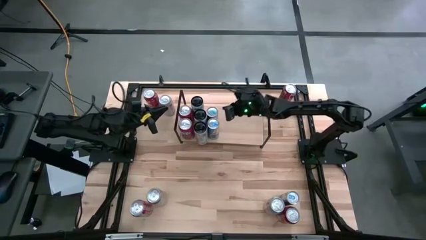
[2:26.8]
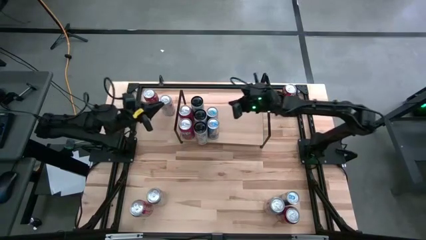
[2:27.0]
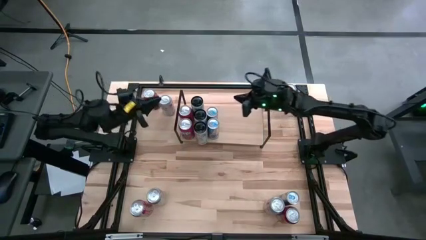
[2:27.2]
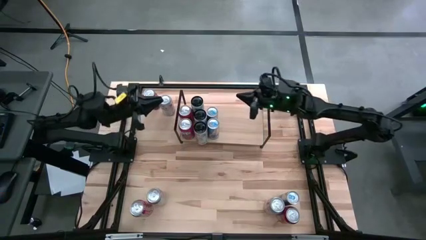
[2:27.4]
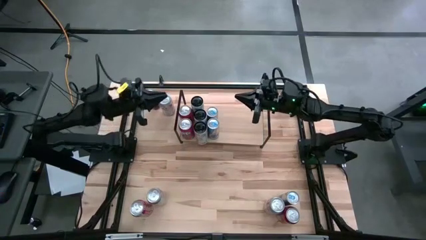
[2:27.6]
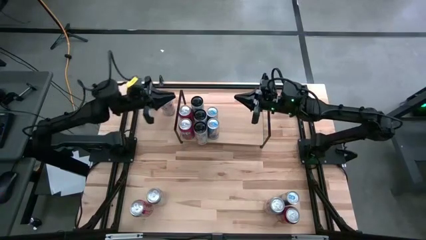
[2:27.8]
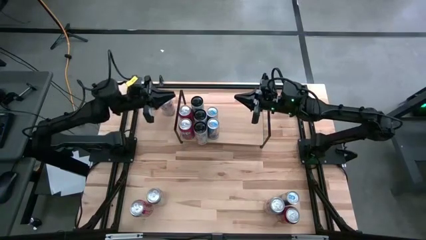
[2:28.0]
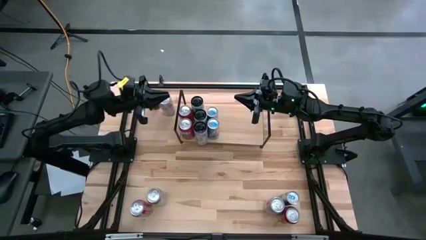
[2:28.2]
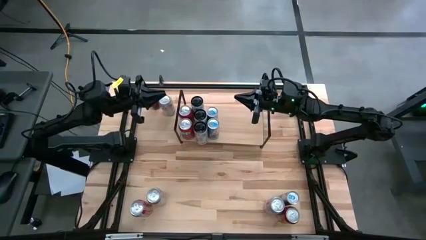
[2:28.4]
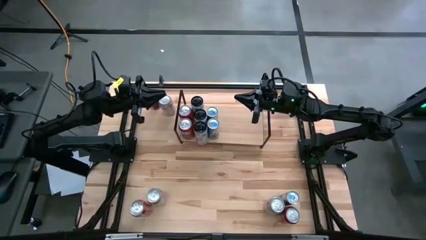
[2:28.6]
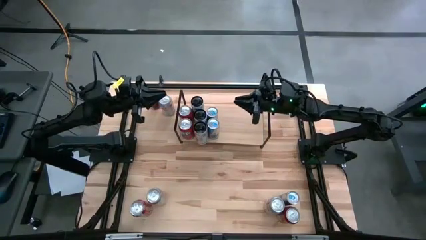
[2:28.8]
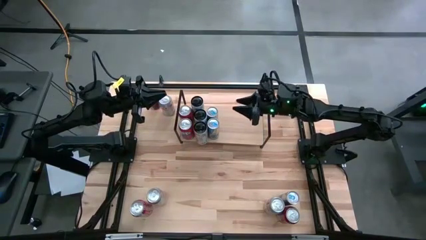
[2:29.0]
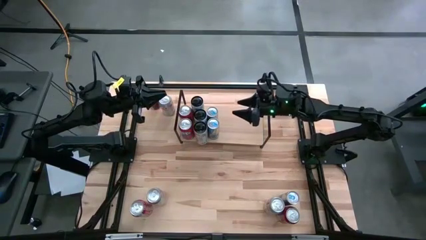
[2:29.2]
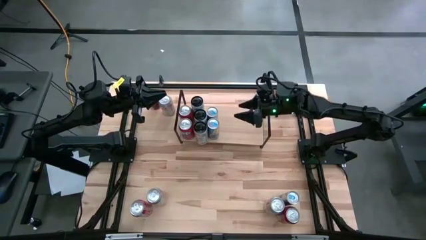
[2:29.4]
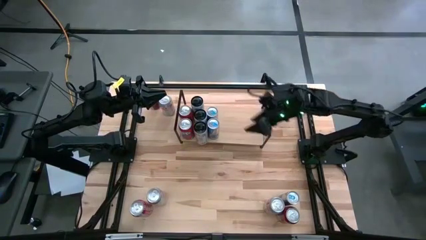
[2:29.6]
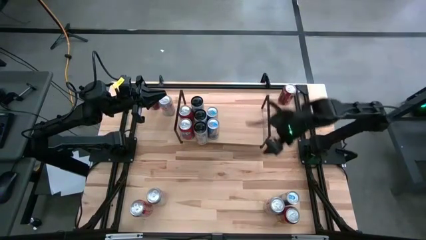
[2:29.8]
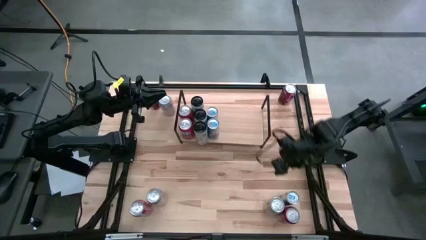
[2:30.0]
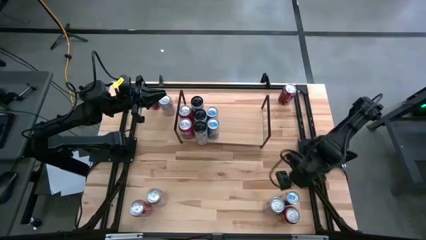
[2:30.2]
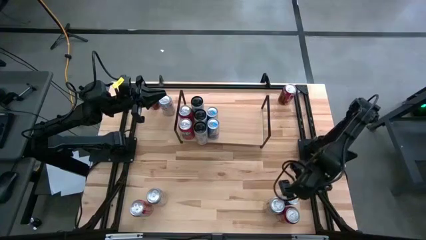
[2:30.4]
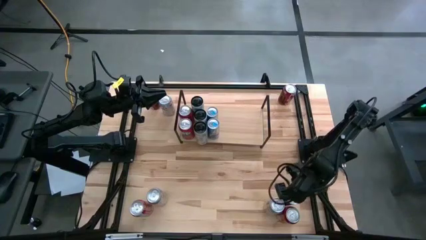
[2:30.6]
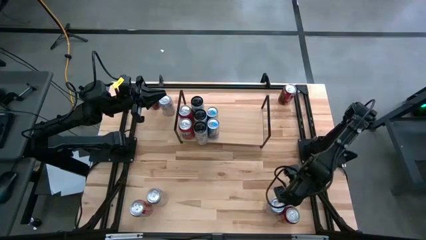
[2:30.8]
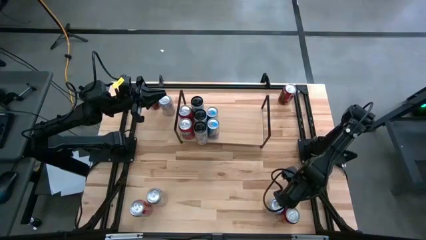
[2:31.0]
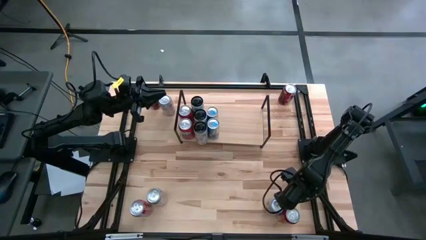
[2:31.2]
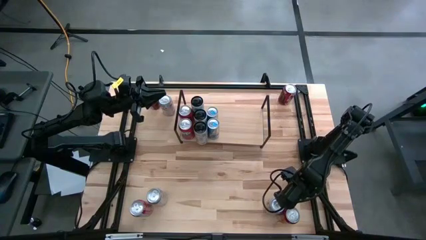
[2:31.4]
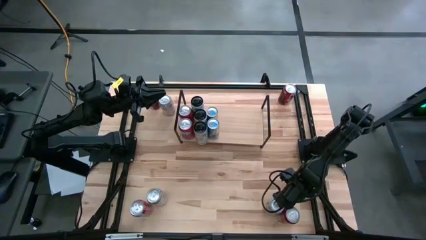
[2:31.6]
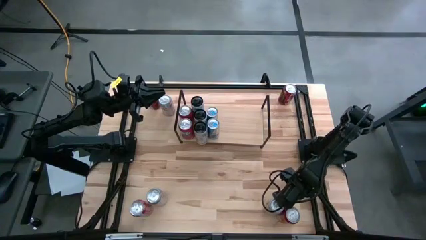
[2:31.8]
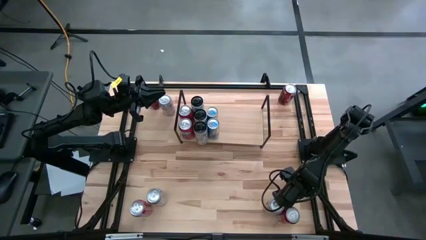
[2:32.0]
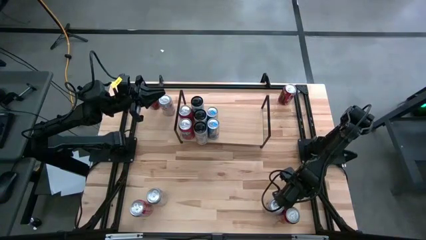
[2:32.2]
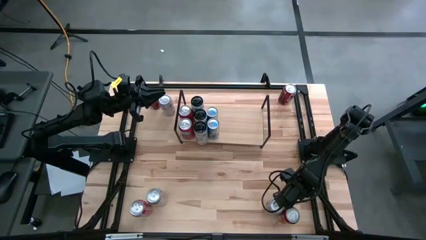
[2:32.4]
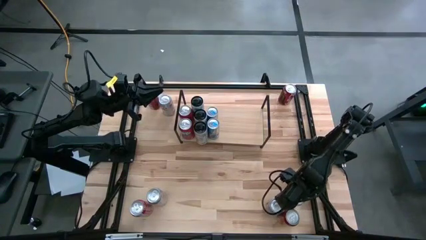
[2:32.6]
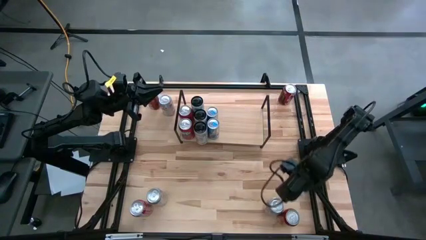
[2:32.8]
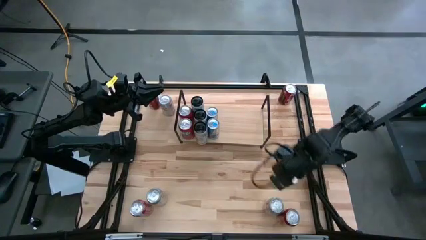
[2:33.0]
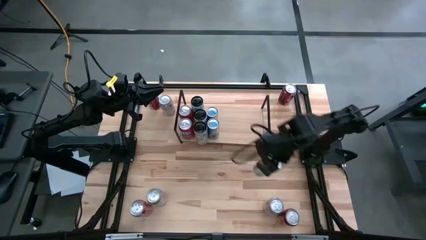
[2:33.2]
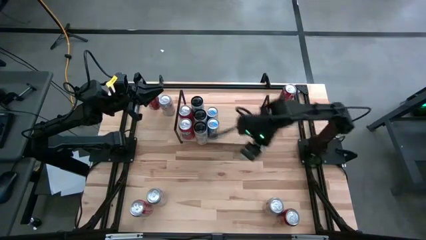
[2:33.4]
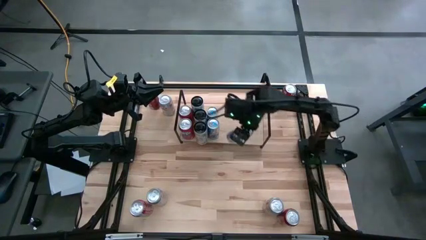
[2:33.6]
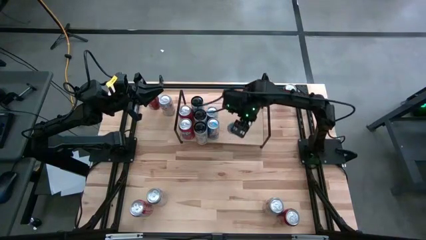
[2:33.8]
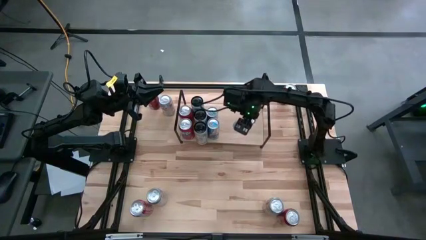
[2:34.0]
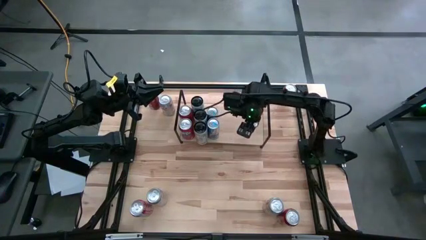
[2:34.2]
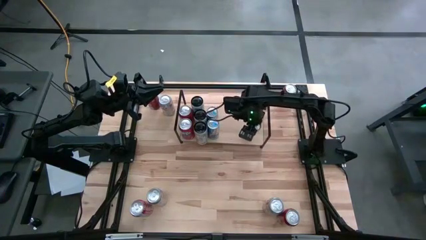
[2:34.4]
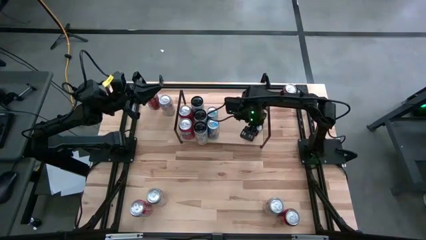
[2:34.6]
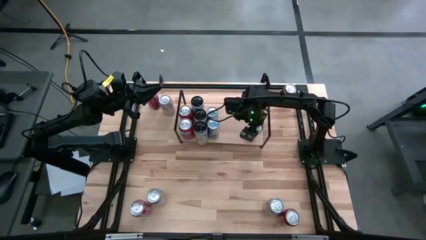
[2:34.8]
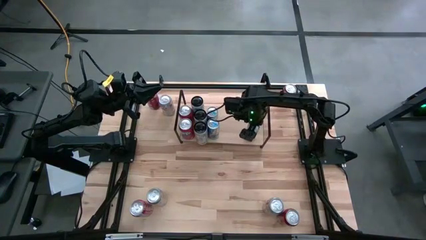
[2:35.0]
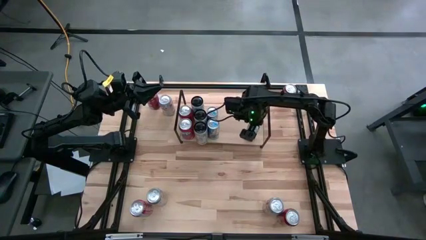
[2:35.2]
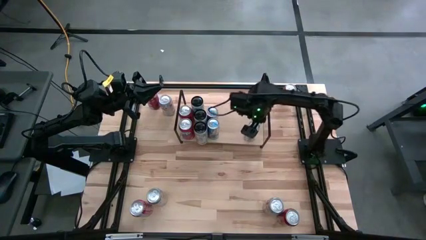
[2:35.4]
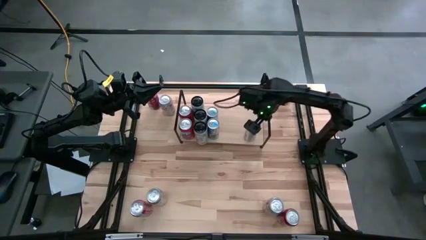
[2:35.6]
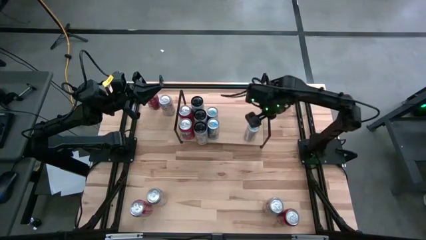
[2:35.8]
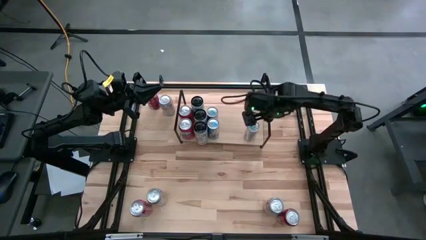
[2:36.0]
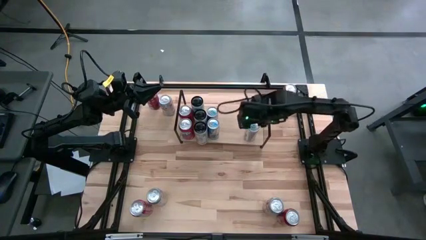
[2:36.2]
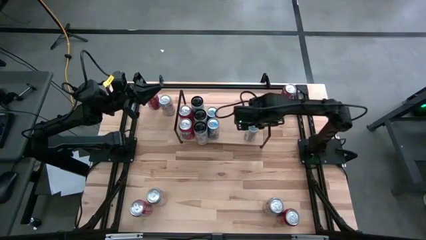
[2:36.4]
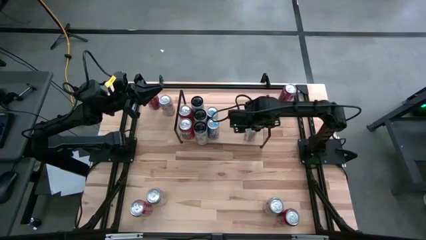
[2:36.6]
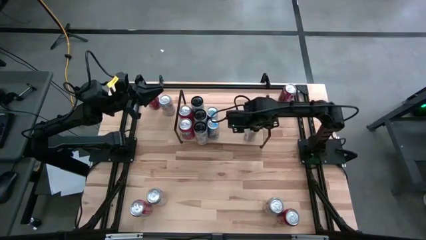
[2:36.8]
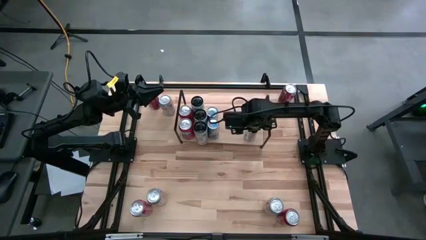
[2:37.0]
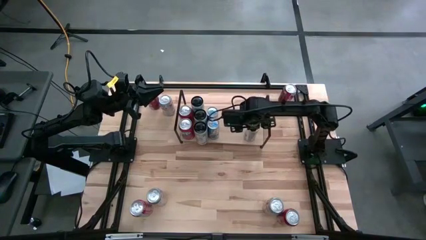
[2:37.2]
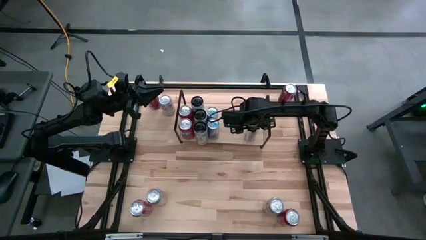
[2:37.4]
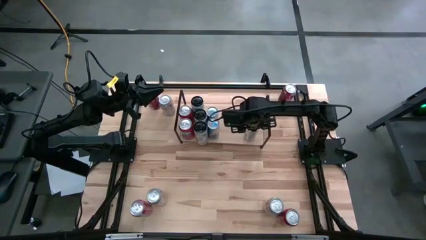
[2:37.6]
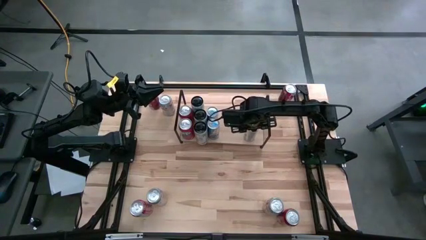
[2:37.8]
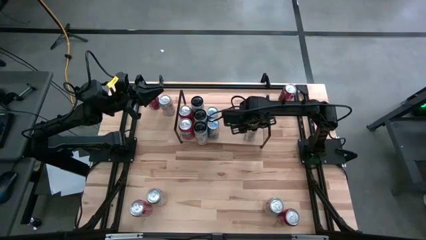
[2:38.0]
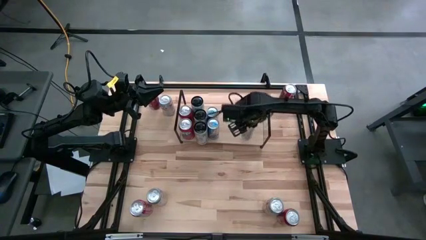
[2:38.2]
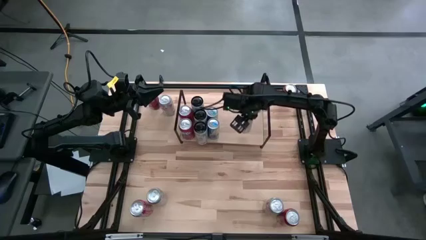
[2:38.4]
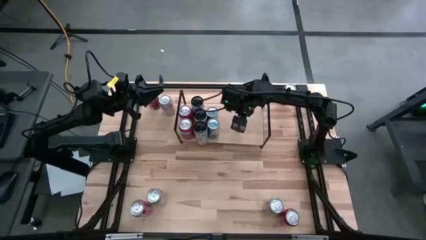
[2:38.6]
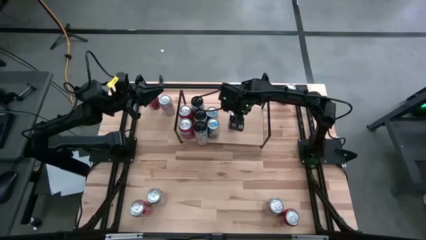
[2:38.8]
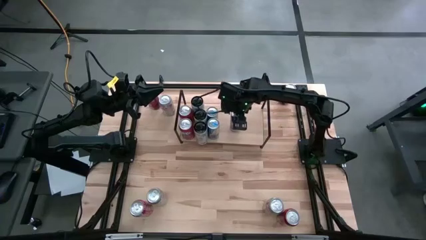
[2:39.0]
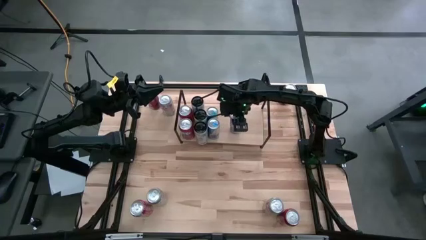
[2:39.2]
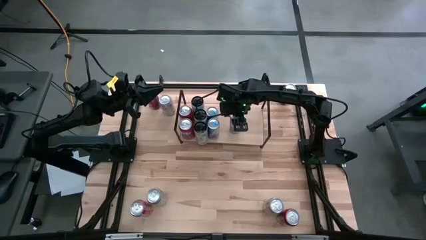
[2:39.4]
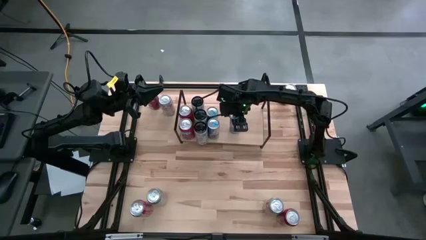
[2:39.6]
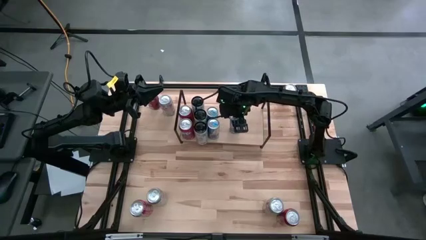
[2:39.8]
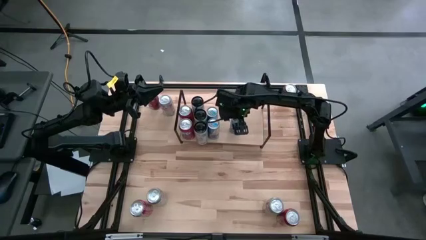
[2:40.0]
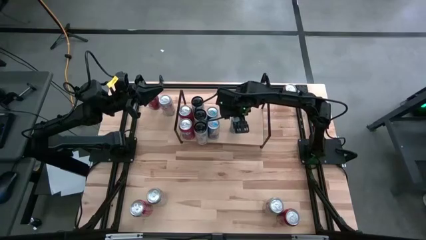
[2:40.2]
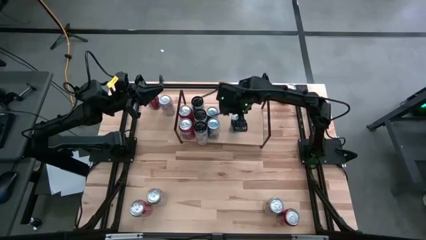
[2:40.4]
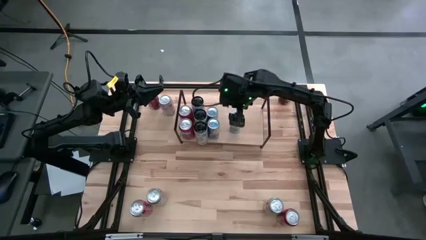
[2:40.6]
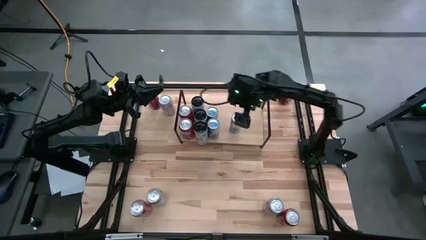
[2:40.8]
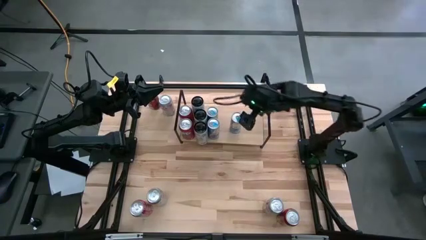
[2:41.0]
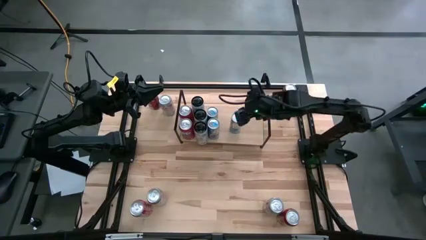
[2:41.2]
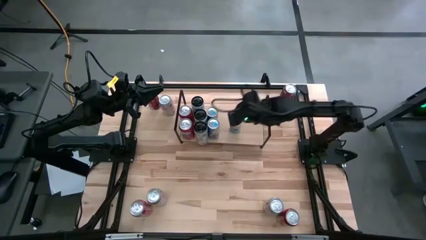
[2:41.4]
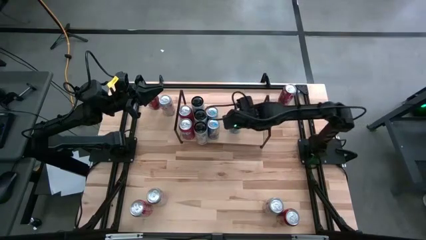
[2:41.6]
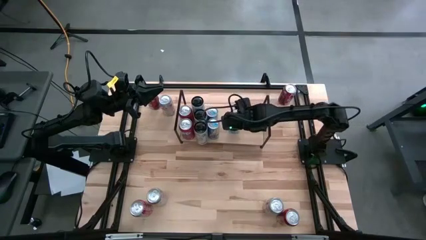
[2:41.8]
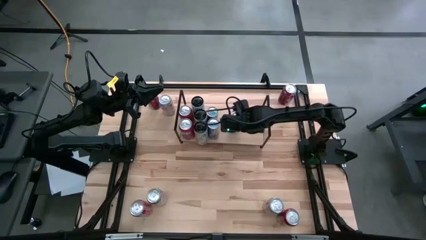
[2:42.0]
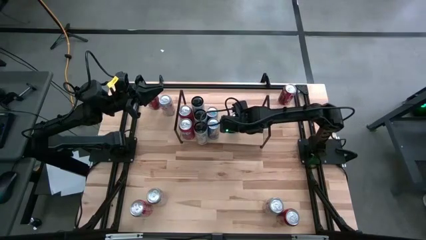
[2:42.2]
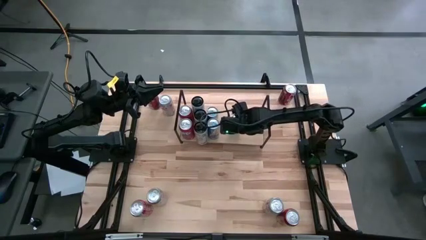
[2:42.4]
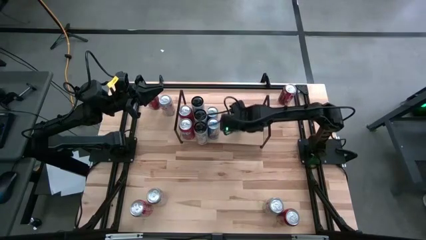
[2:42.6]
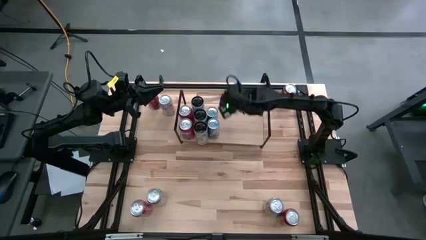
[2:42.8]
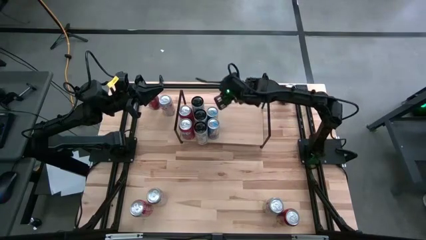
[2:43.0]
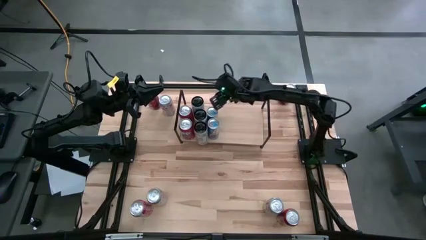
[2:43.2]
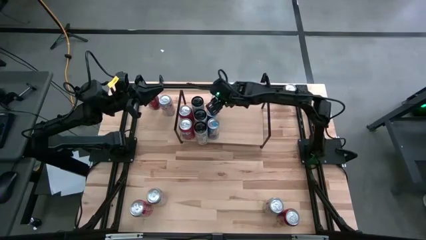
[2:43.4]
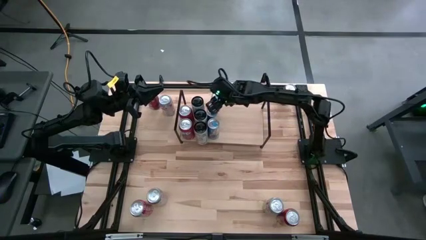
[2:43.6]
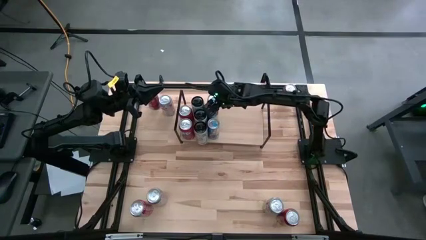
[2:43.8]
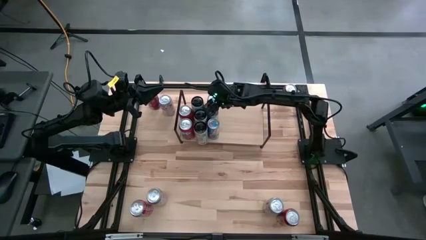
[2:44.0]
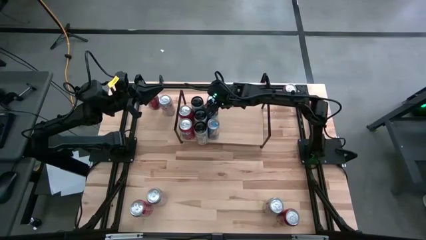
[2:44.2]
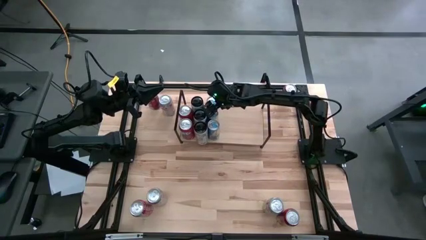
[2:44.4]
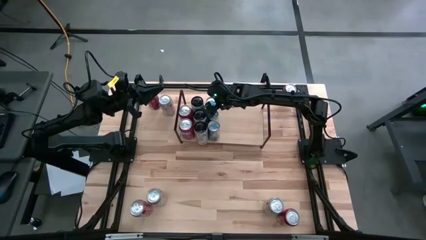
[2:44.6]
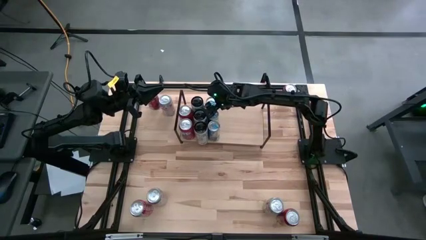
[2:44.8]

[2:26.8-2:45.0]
Task: Place canned beverage on shelf
Put the blue soda can on the shelf aligned with the other blue soda cans
